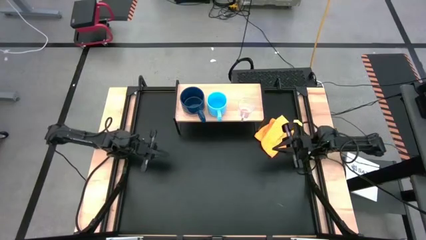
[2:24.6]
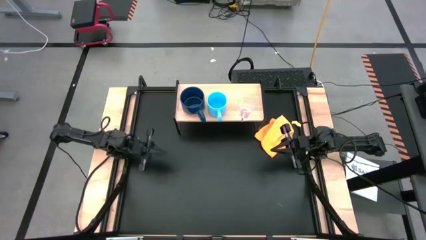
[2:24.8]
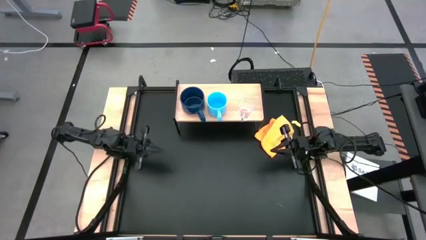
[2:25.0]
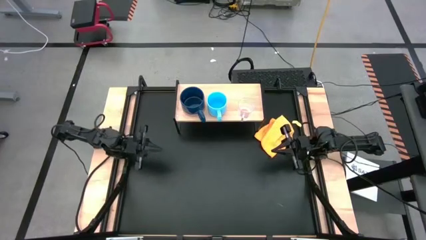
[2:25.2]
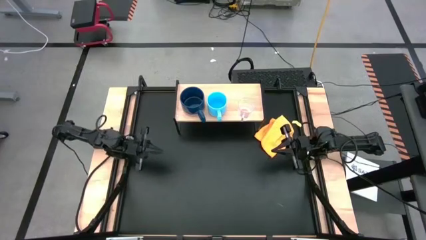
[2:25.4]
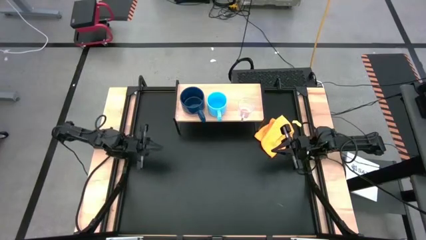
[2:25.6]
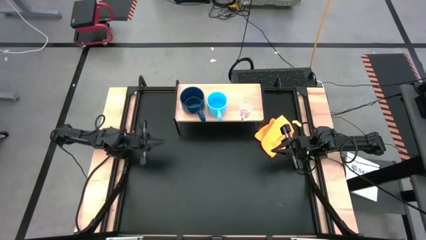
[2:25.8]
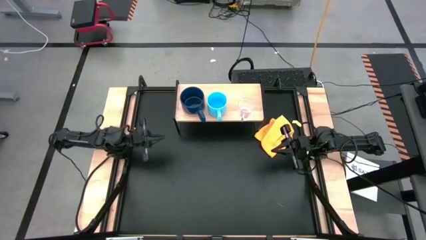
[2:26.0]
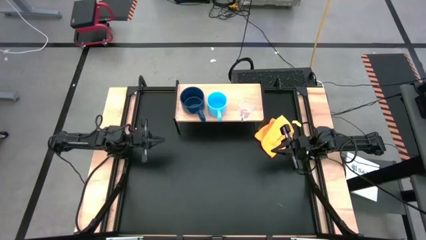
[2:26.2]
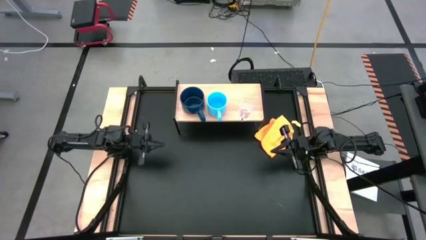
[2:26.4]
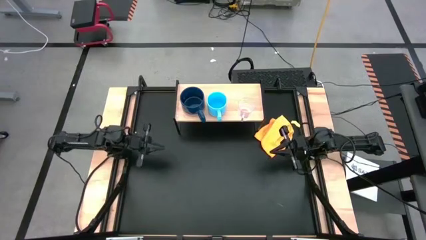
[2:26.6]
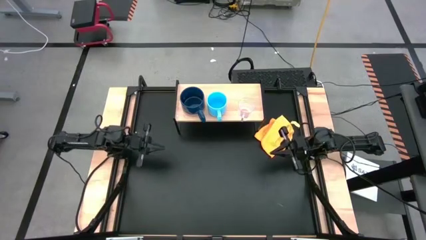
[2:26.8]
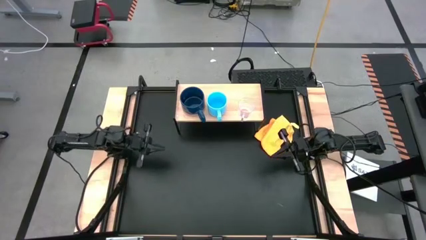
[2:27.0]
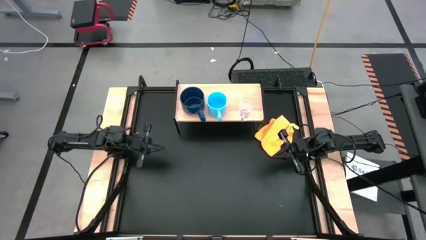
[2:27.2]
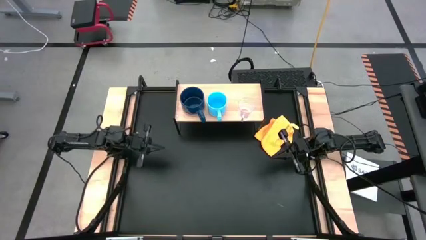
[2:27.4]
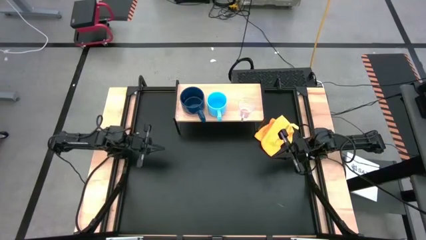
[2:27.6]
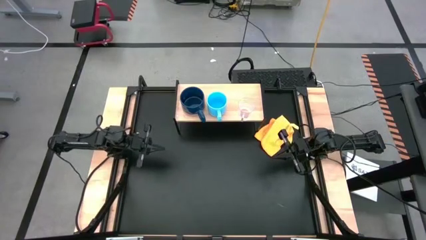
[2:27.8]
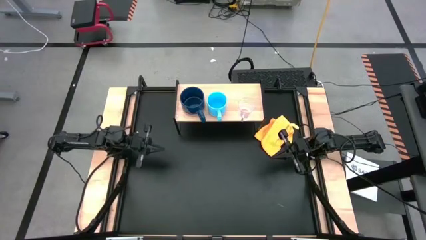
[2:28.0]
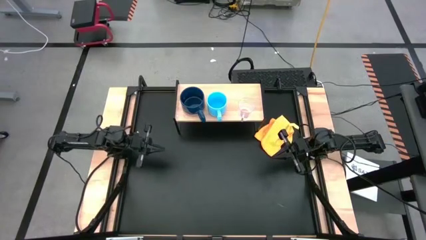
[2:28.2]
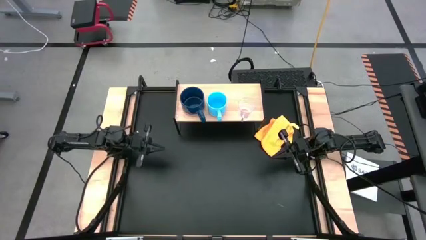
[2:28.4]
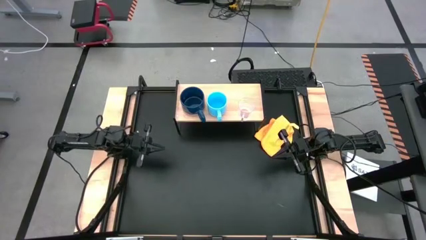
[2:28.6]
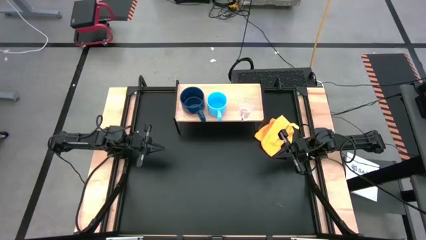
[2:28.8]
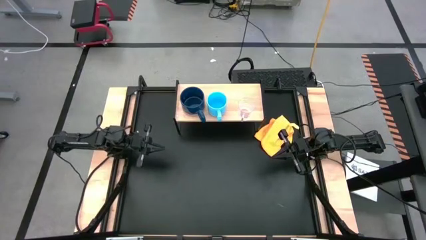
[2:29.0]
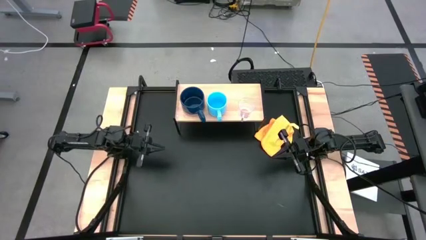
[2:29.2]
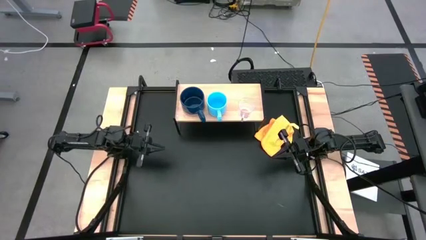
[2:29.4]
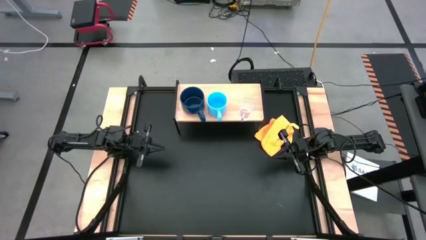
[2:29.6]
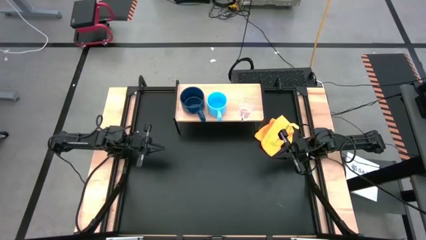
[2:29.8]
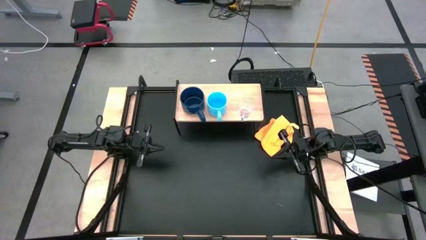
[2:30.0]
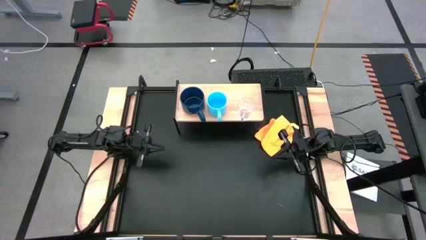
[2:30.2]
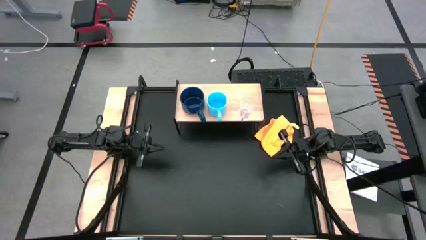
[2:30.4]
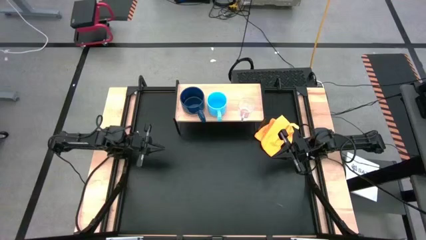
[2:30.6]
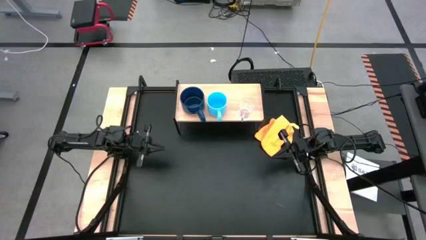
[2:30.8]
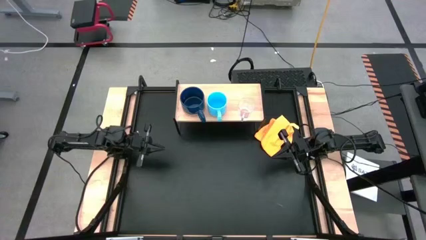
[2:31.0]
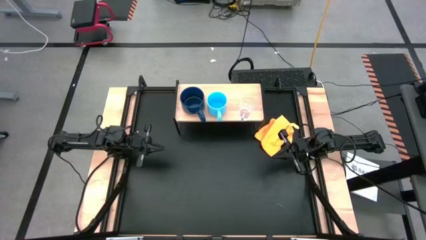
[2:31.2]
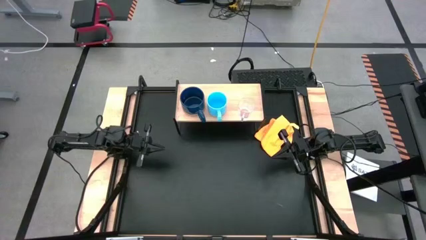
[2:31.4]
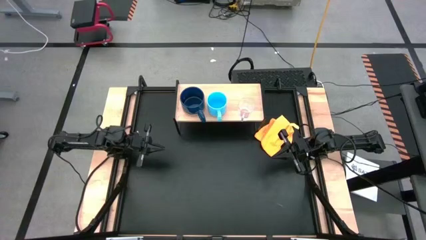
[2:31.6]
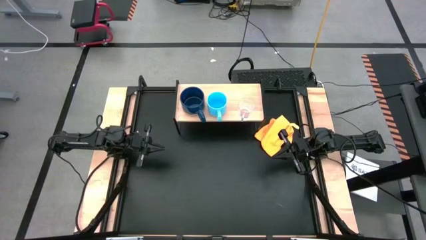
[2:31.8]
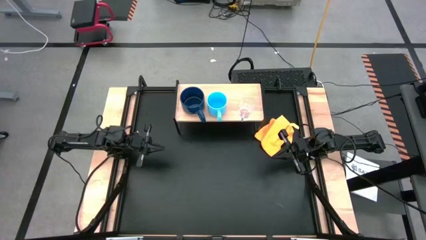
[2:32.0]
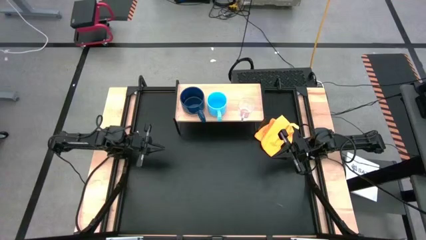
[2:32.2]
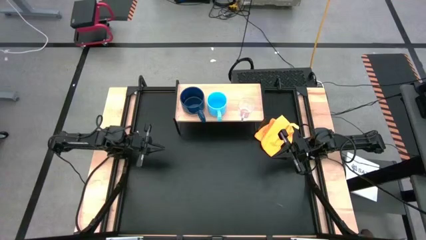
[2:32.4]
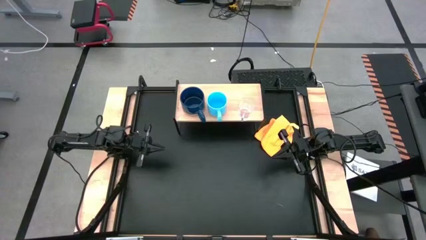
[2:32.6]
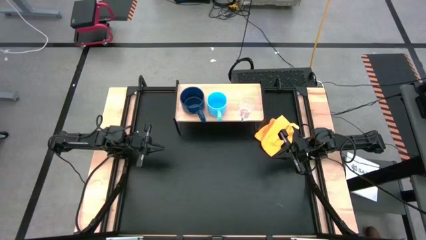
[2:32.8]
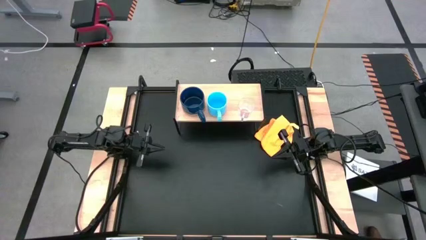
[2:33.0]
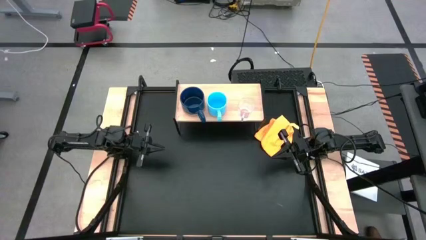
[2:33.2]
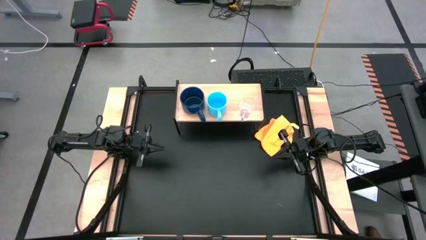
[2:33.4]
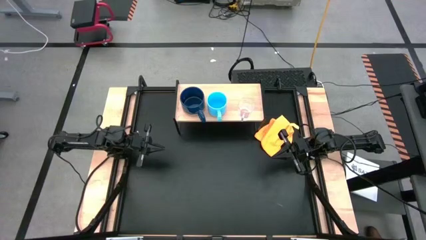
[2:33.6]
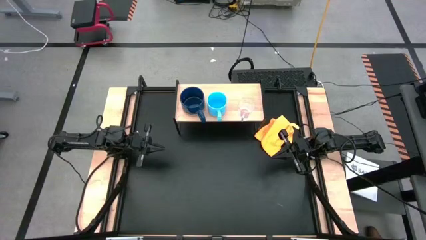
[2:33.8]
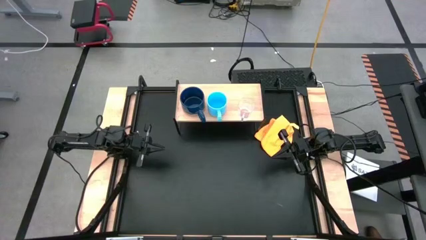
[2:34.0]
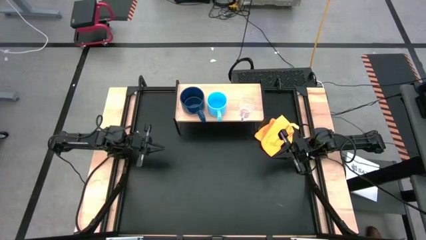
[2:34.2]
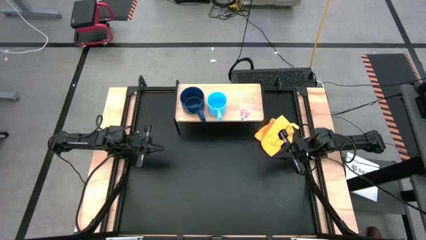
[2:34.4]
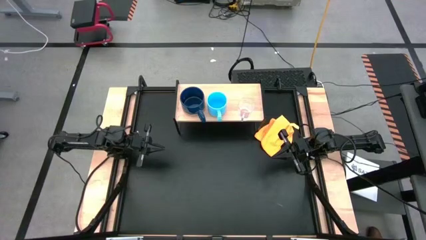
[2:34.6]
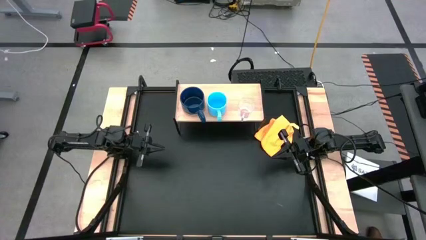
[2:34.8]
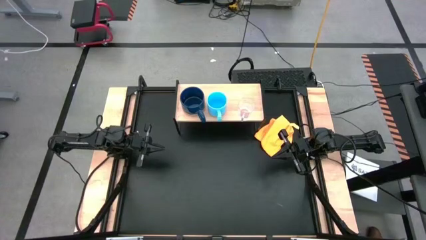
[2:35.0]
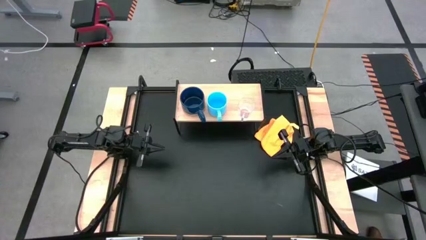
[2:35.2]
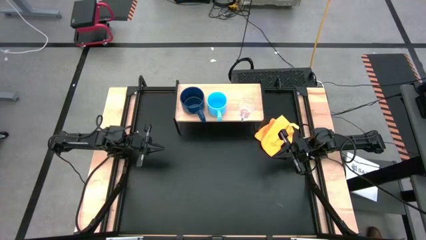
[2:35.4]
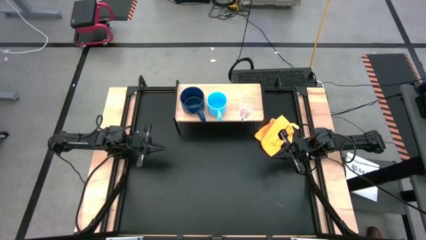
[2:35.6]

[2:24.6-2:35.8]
Task: Stack small to large cups/mugs on shelf
Return to Home Position

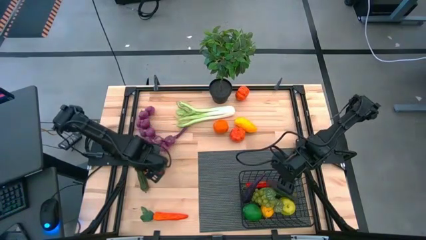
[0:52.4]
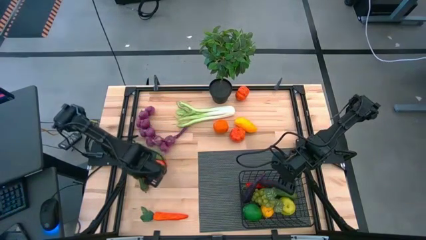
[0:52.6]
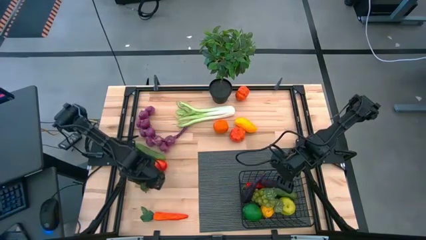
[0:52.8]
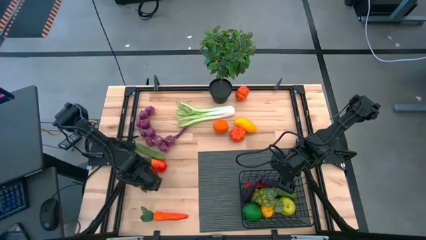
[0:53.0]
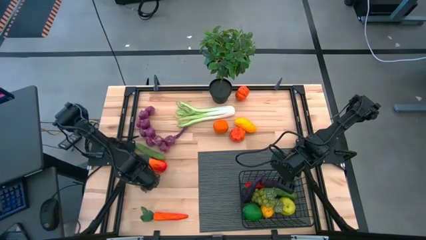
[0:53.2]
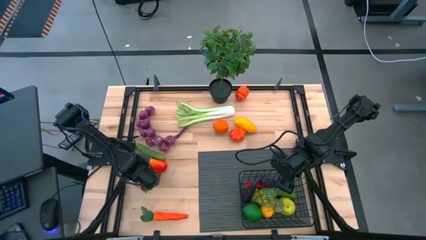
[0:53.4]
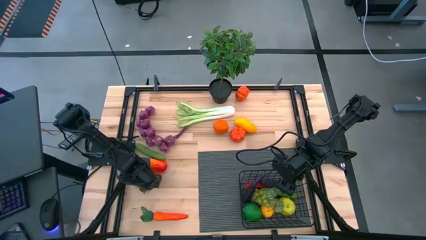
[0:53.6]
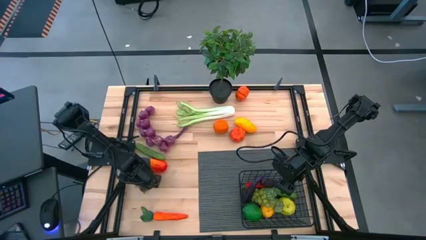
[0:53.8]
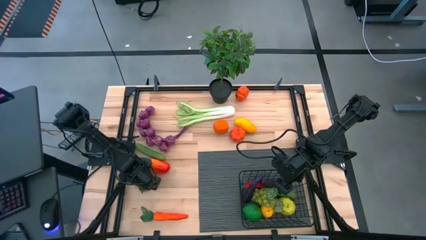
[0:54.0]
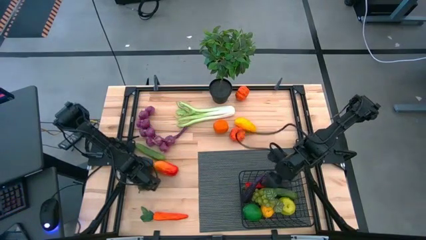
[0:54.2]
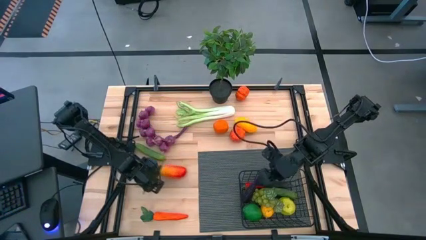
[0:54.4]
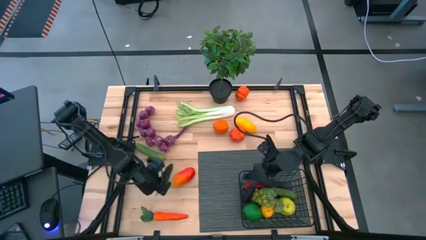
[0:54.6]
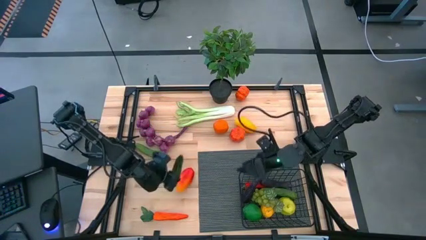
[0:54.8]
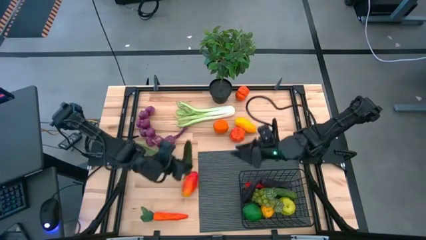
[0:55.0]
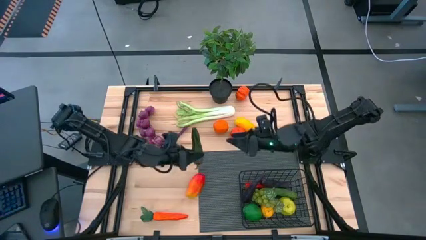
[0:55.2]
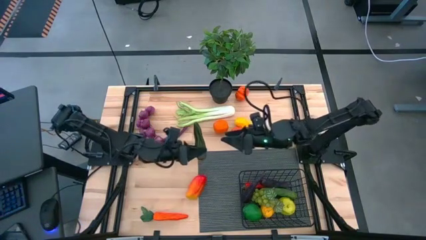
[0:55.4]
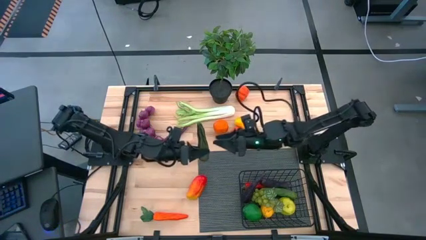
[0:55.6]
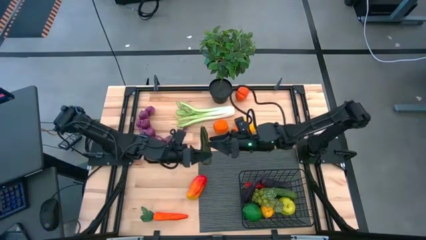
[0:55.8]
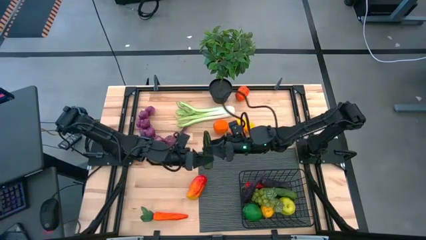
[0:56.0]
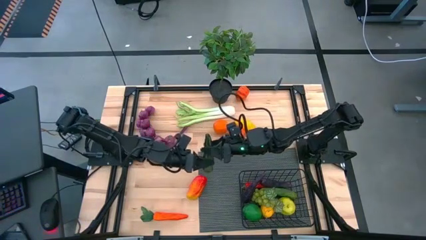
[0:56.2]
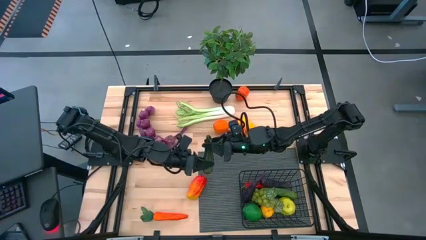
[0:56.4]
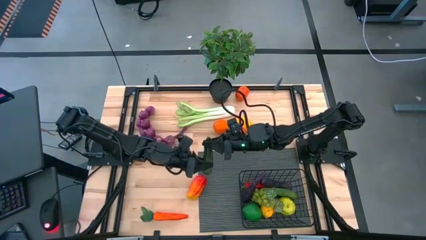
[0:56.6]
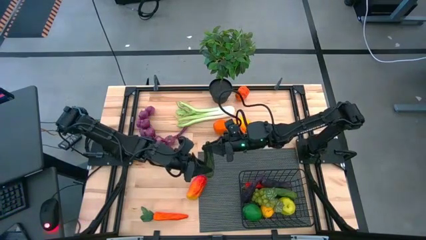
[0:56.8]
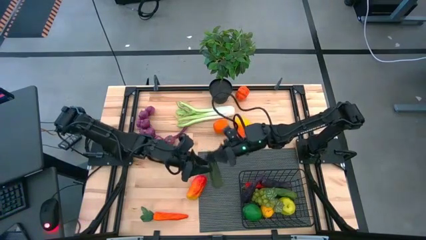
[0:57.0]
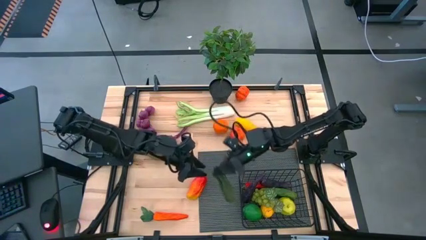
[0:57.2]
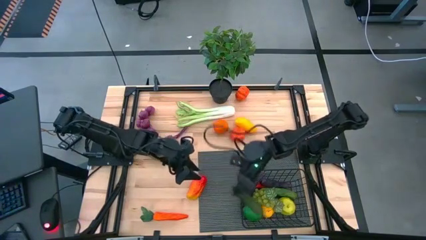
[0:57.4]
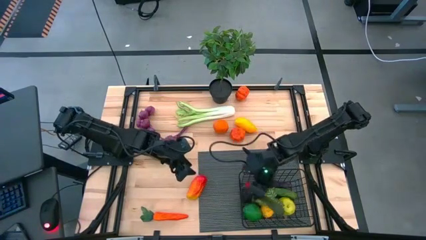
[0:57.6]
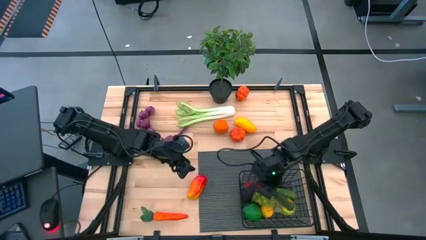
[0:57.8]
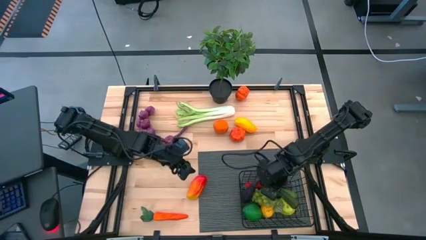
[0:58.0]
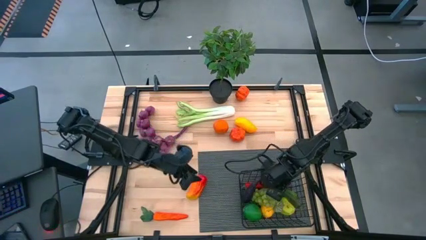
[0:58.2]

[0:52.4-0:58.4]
Task: Build produce basket
Put the green chili pepper into the black wire basket
